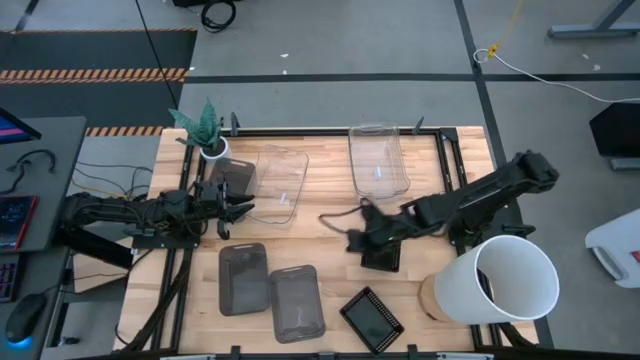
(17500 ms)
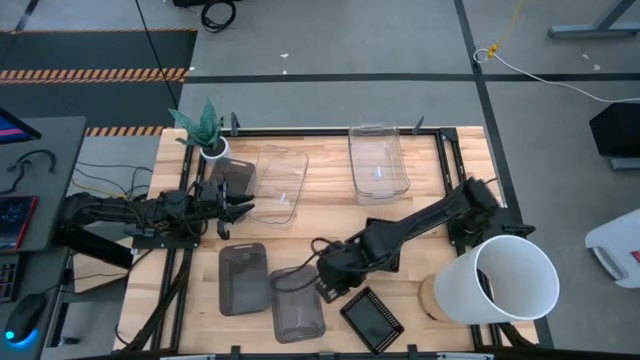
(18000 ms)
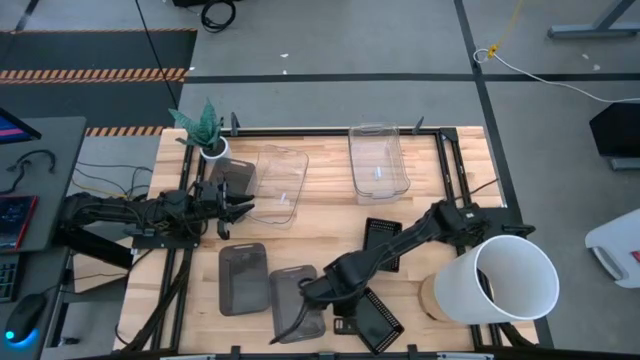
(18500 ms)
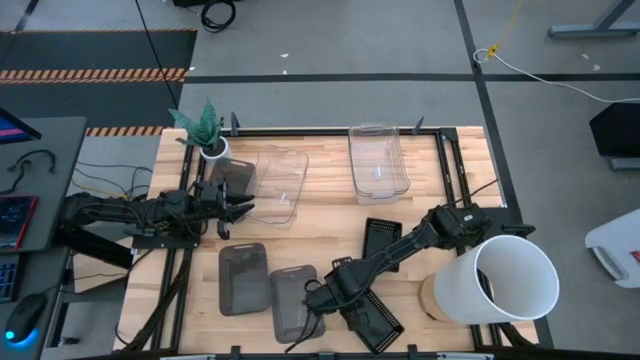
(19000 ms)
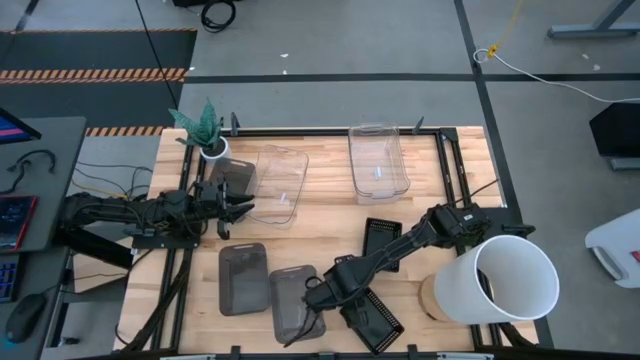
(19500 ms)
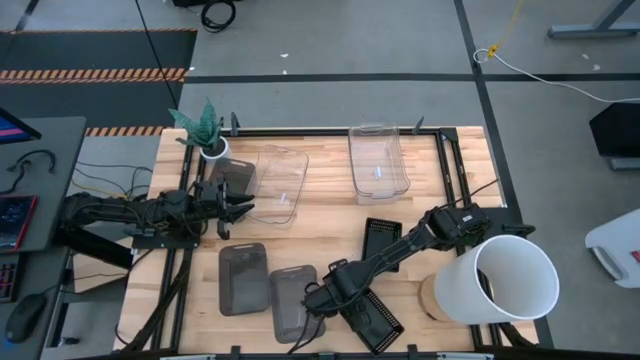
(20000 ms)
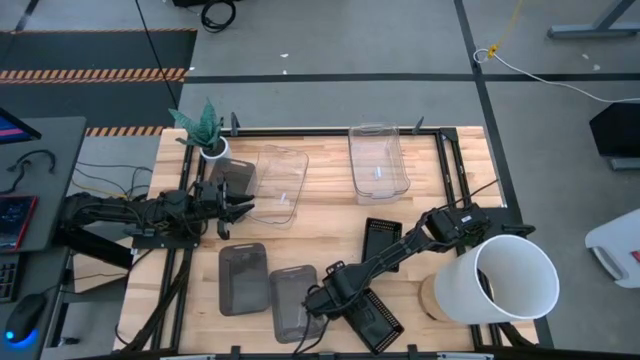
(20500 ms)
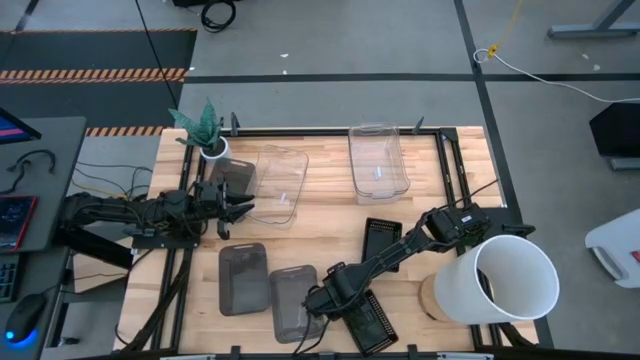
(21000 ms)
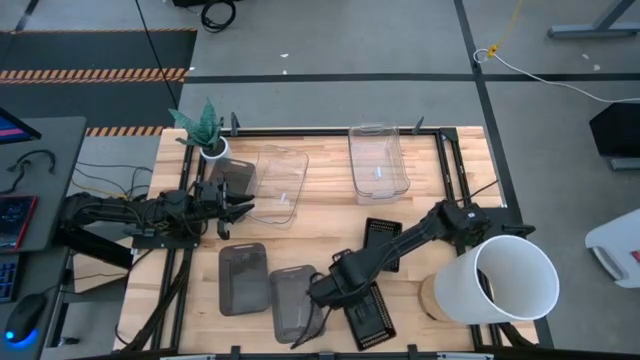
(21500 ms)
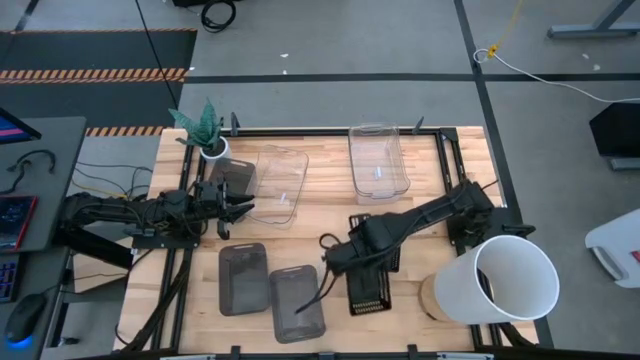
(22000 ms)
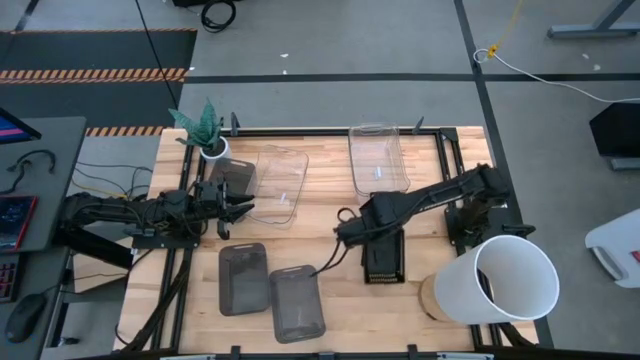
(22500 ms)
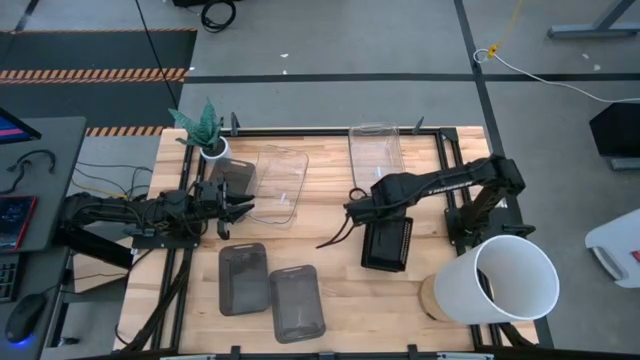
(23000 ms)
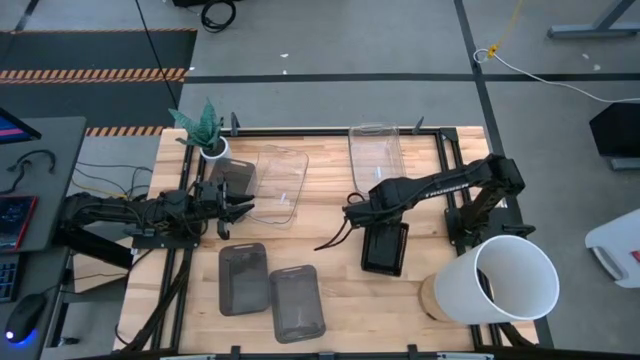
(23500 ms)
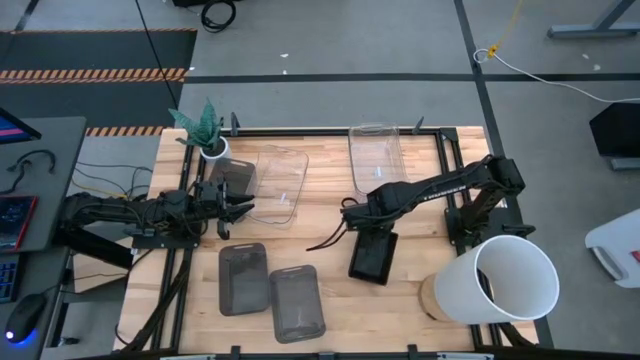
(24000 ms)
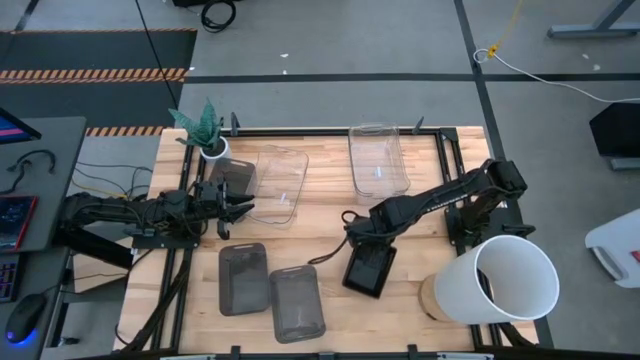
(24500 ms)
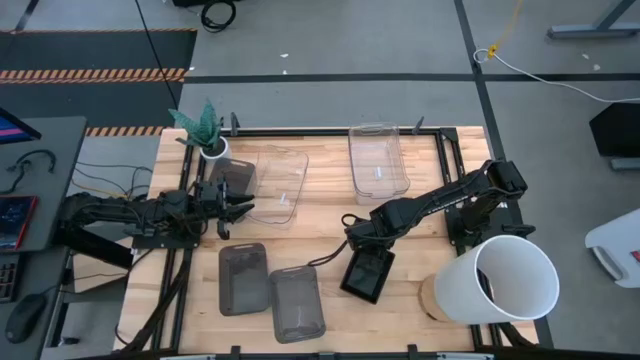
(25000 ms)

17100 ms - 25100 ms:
Stack the bottom black bin on the top black bin

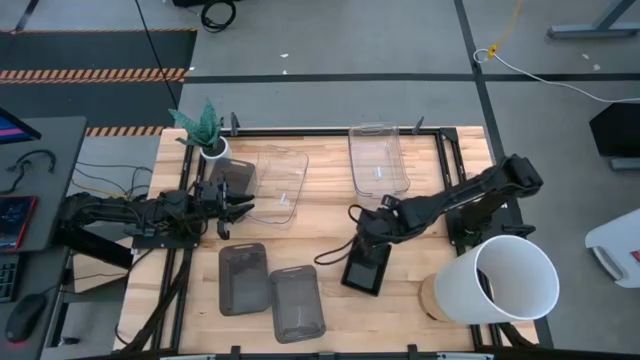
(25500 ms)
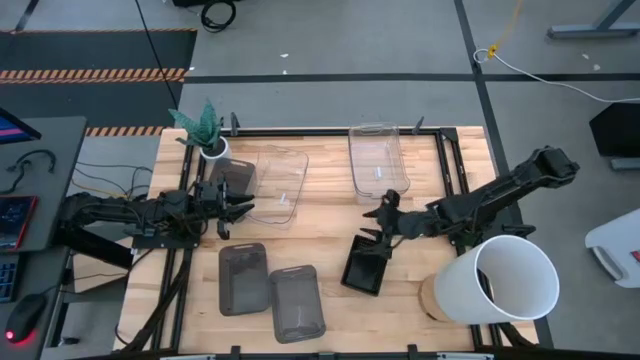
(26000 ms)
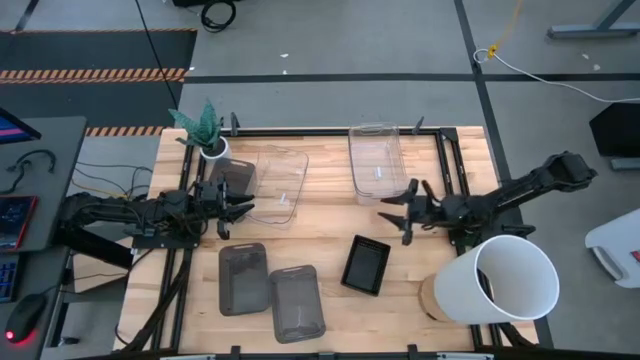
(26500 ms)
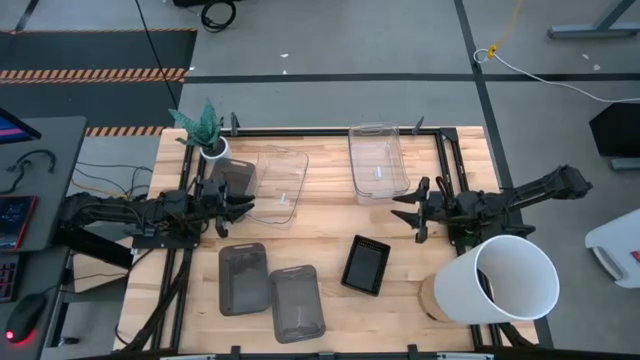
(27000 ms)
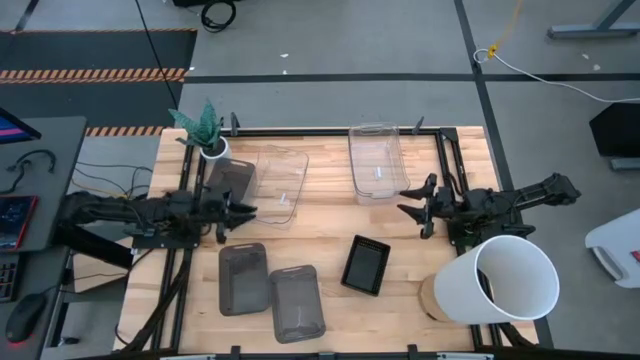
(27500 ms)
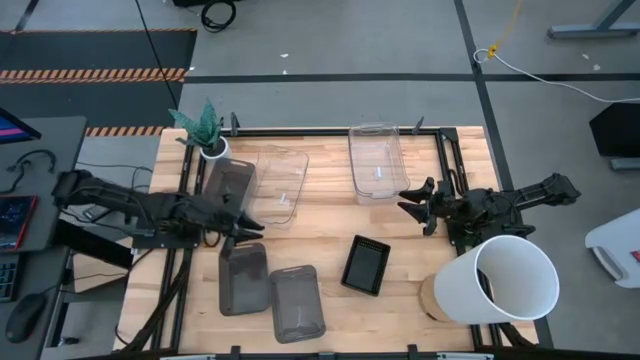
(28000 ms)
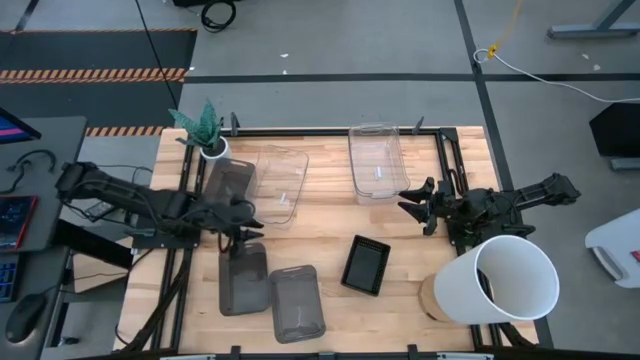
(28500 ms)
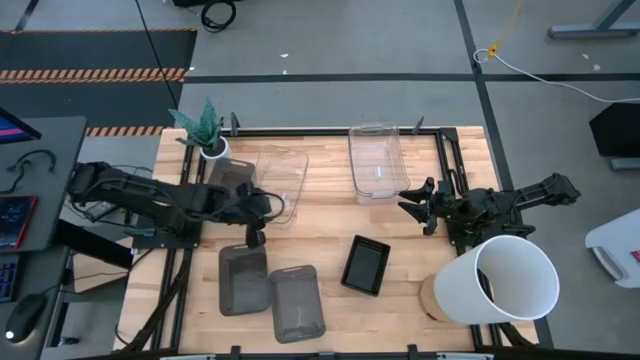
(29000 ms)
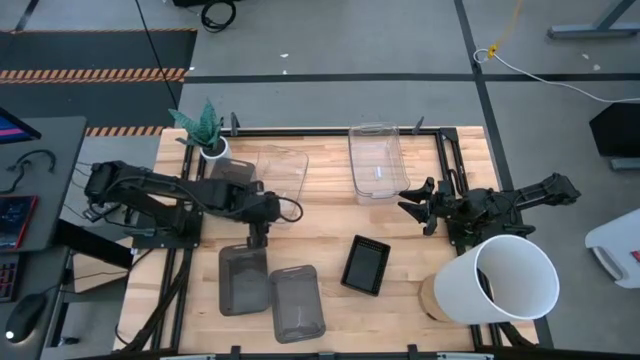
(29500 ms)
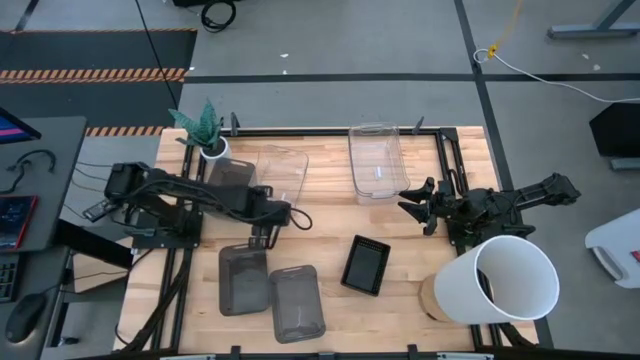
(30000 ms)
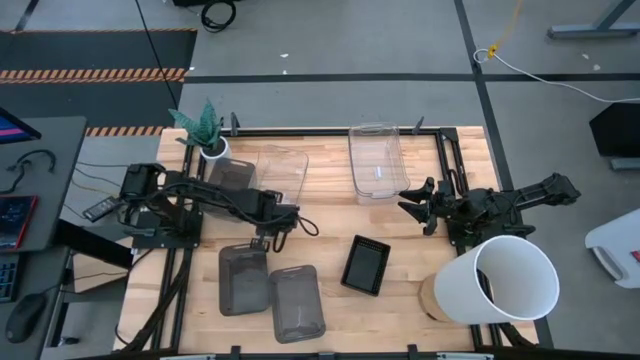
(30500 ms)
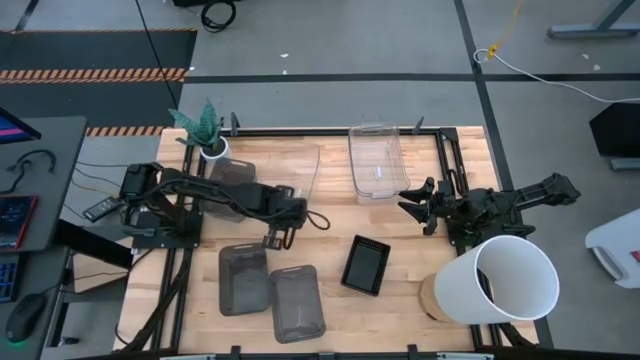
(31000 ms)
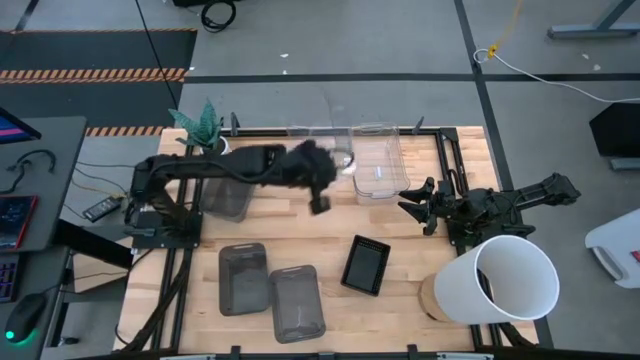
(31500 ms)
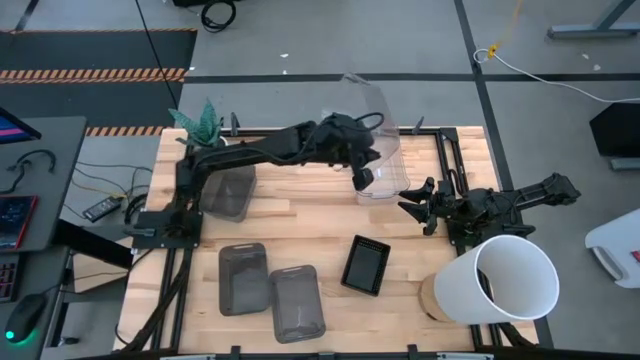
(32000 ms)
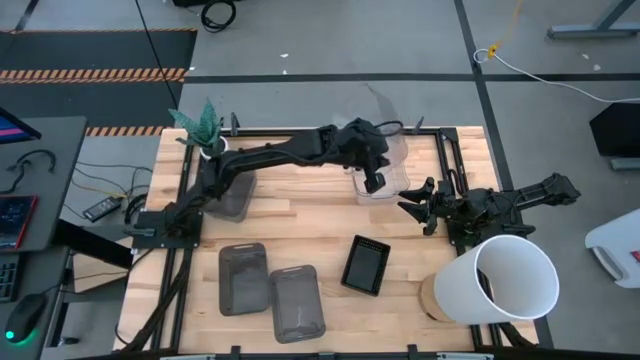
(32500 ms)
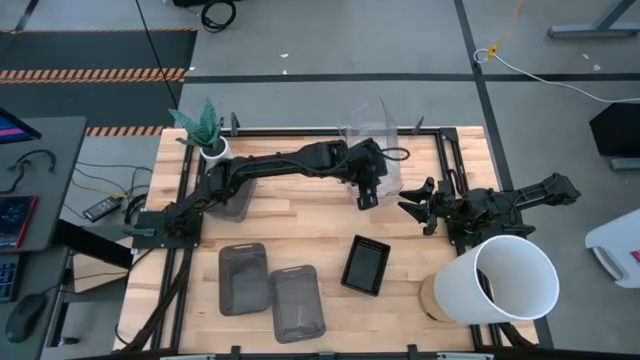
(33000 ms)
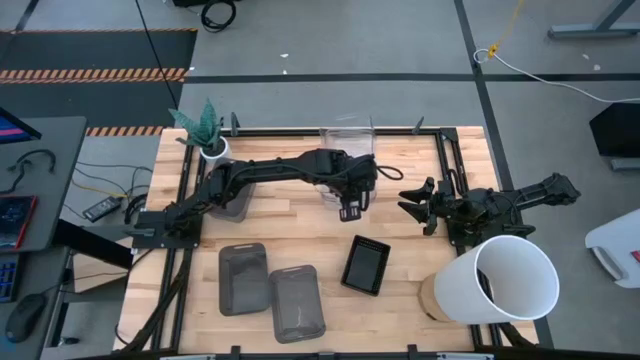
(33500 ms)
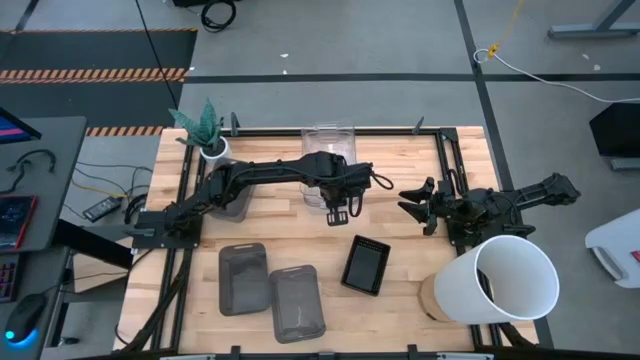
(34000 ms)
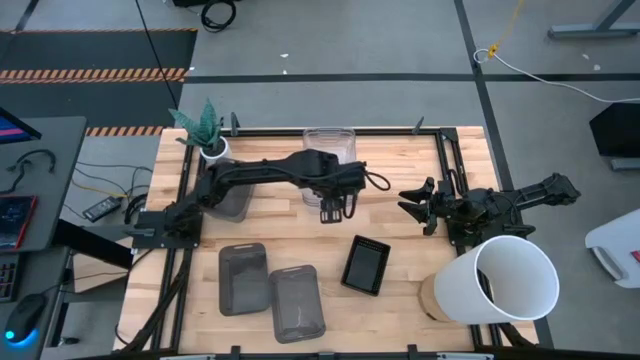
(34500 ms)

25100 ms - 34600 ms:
Stack the left transparent bin on the right transparent bin

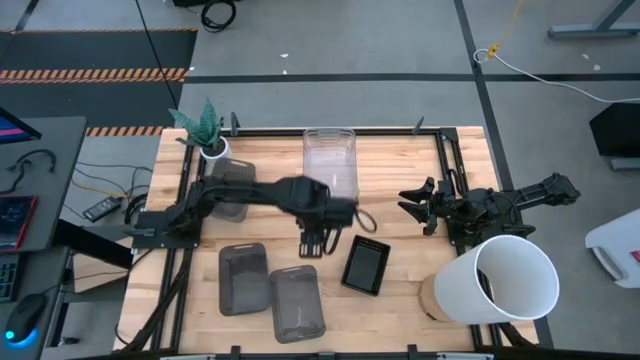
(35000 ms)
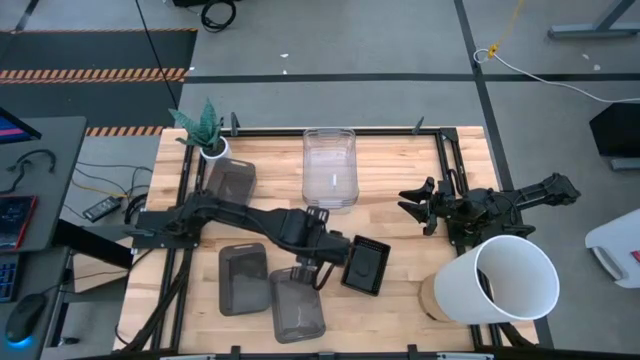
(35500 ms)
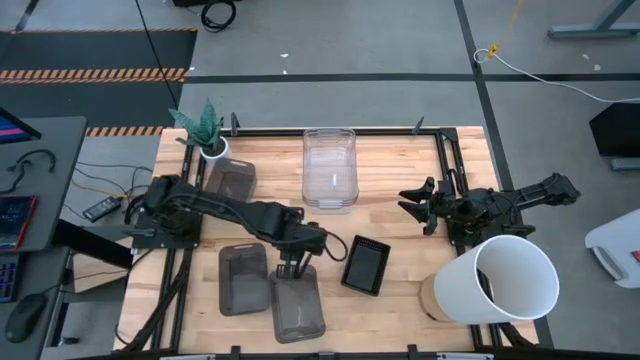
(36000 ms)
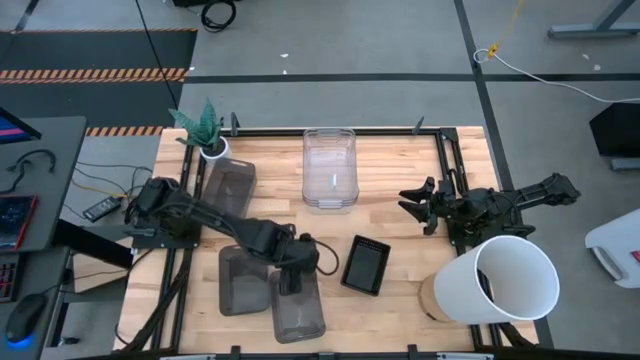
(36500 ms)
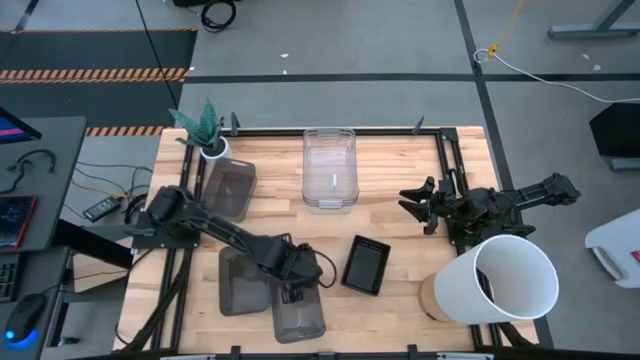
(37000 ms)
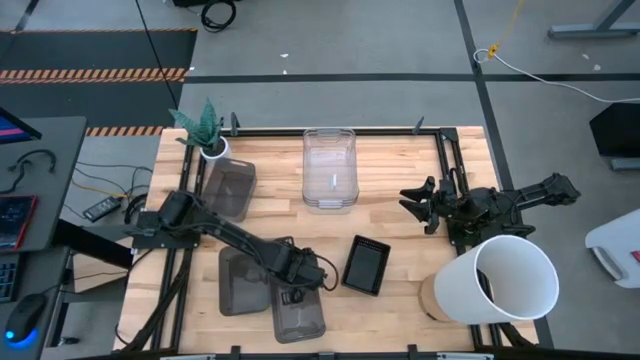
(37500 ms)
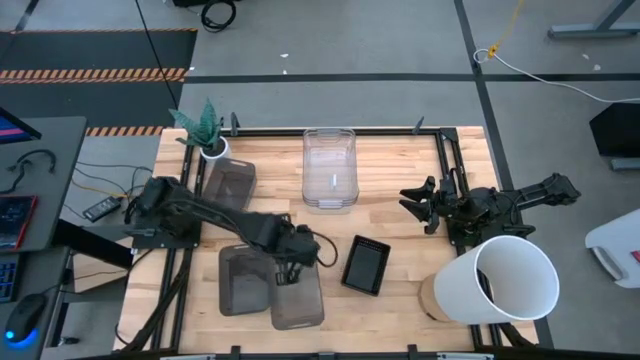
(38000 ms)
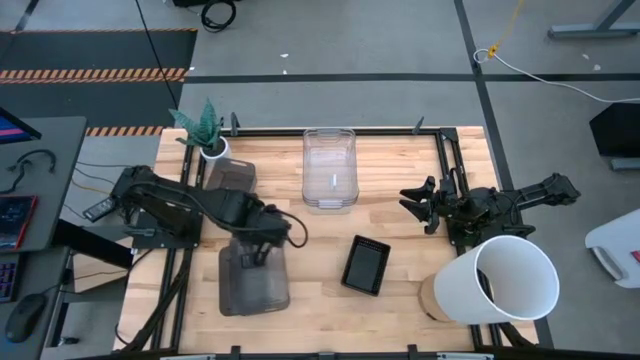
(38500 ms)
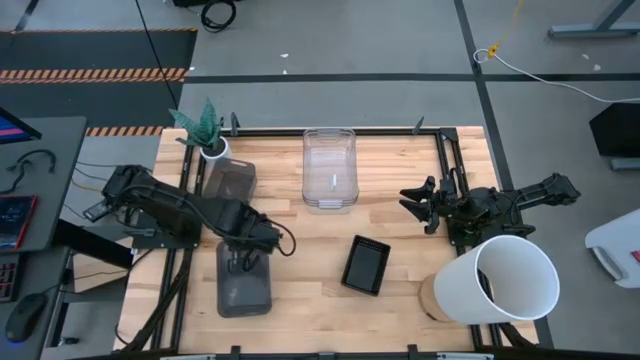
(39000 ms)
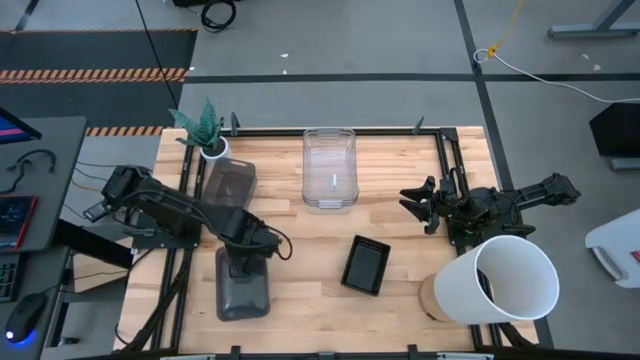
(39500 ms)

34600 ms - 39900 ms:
Stack the right transparent black bin on the bottom left transparent black bin
